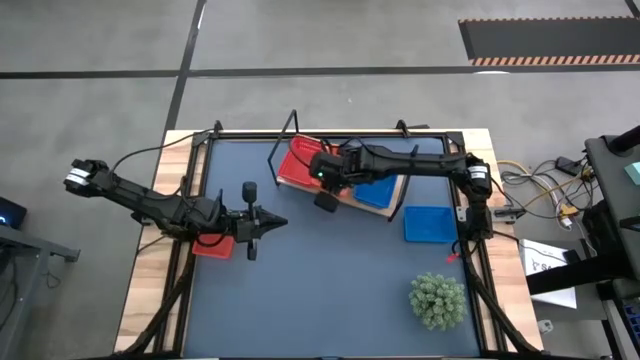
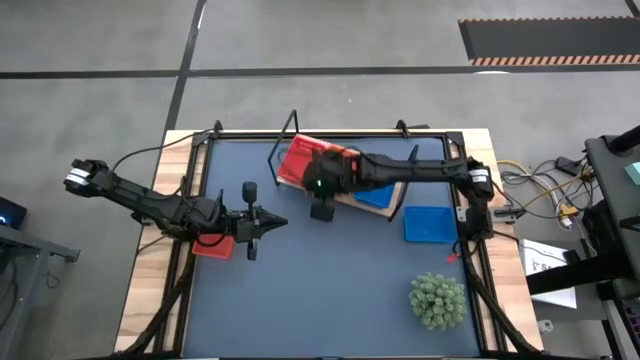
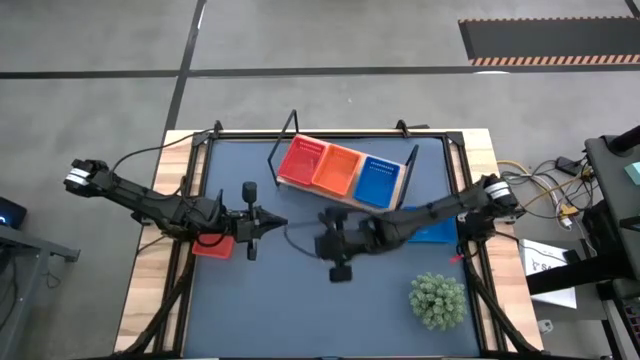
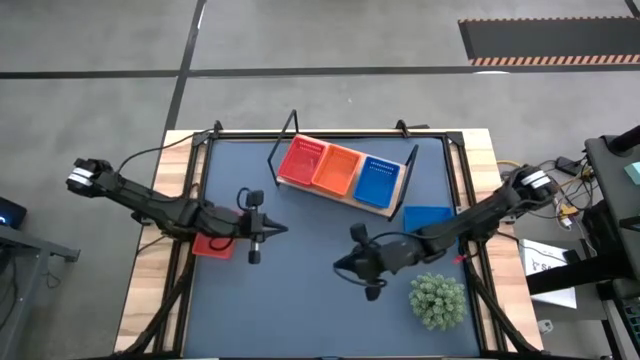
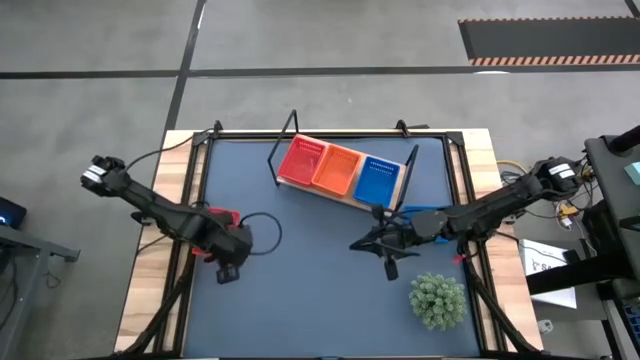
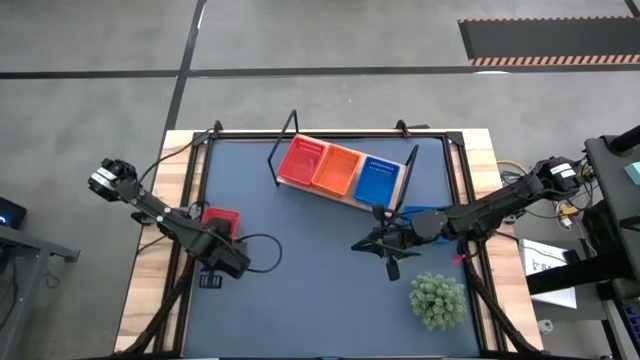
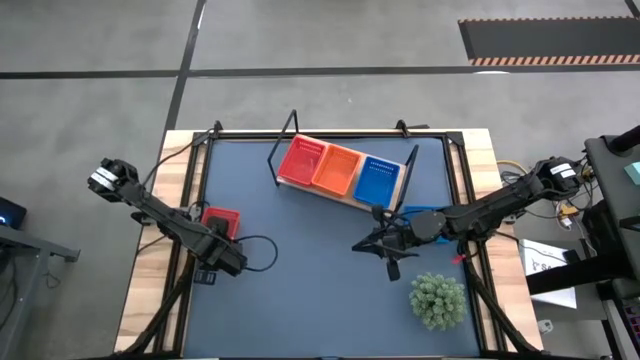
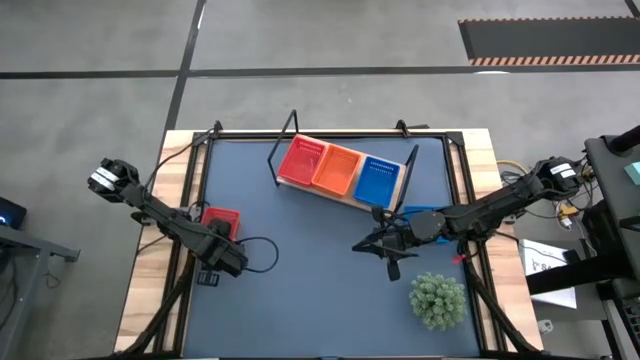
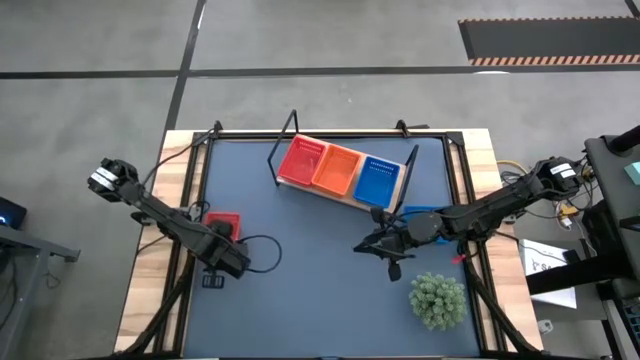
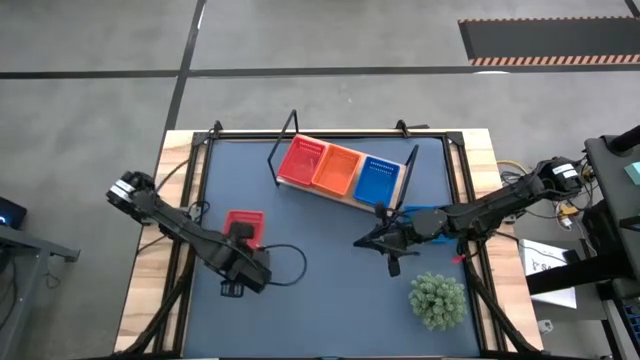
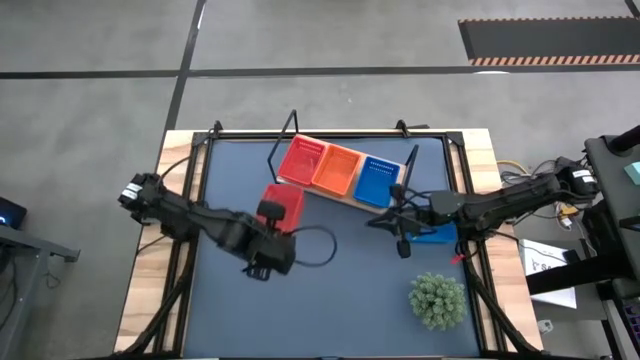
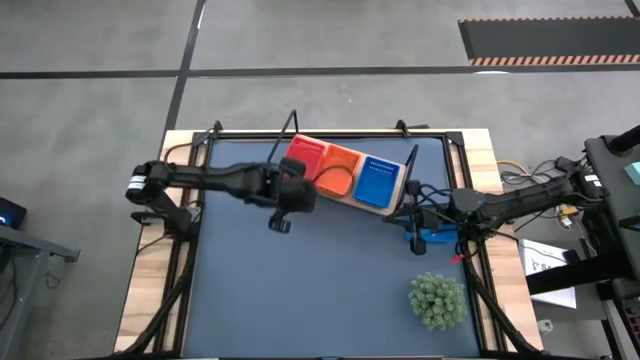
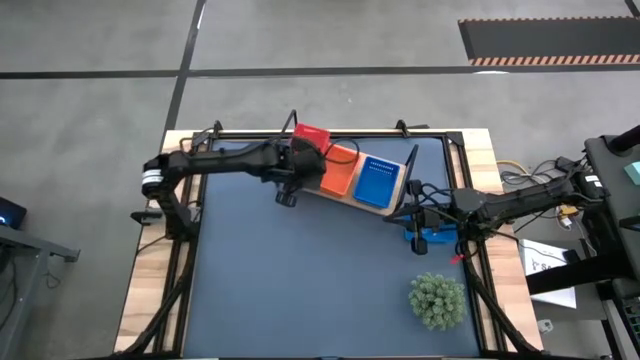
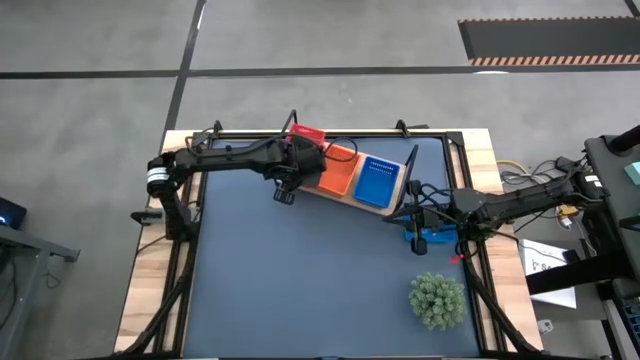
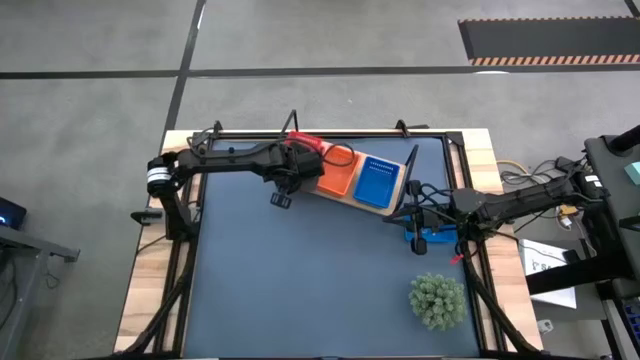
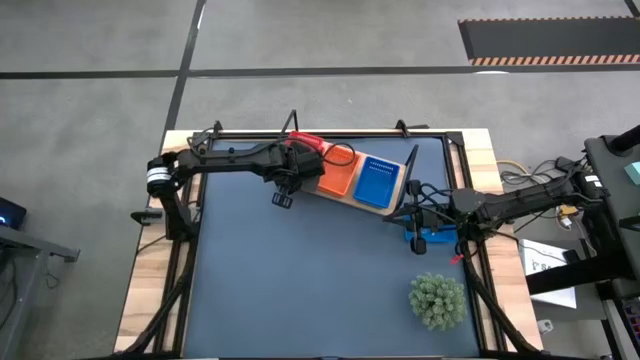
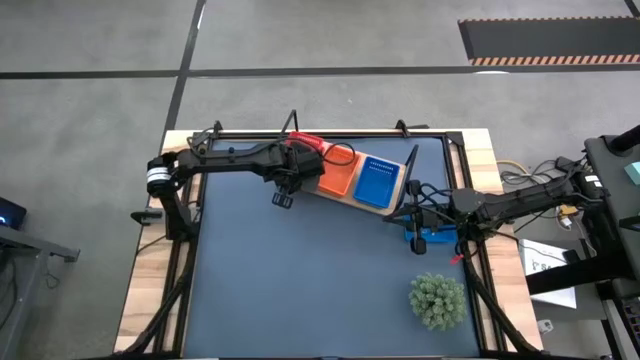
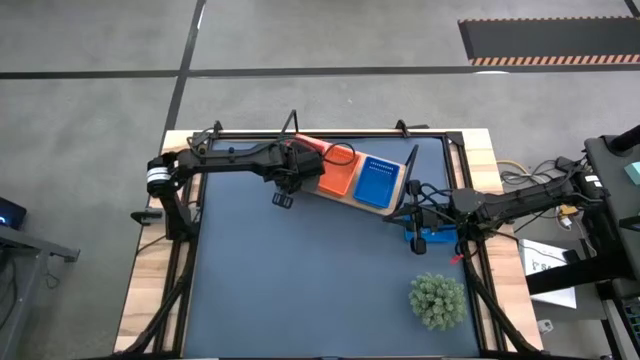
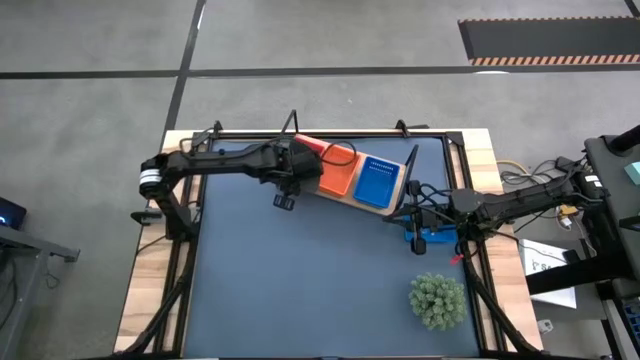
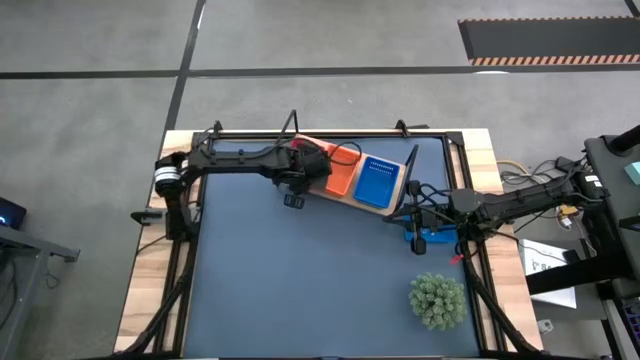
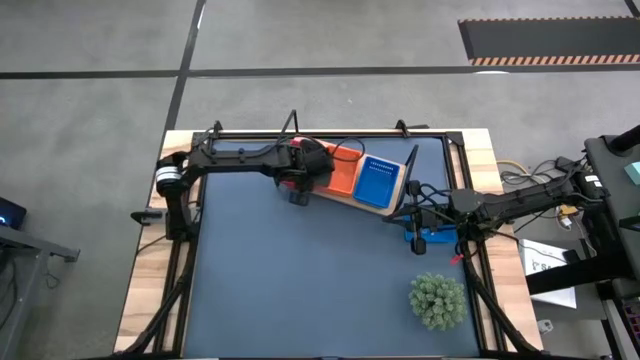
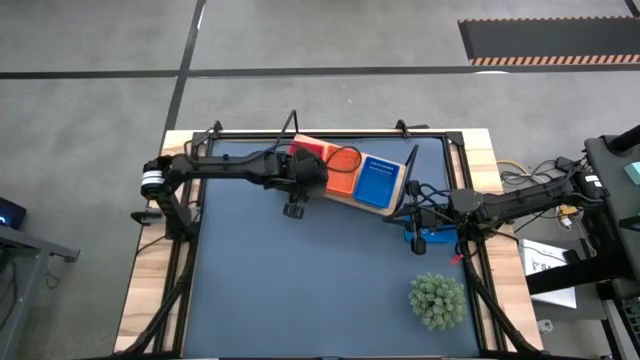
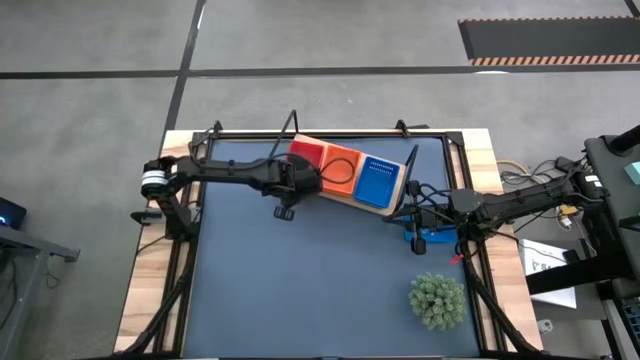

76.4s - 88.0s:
Task: Stack baskets on shelf by color
Stack the red bin on top of the red bins on the shelf

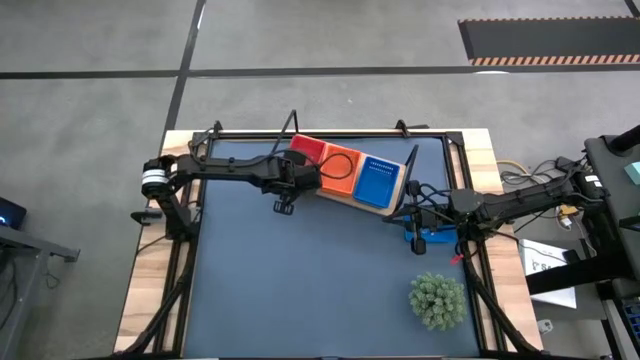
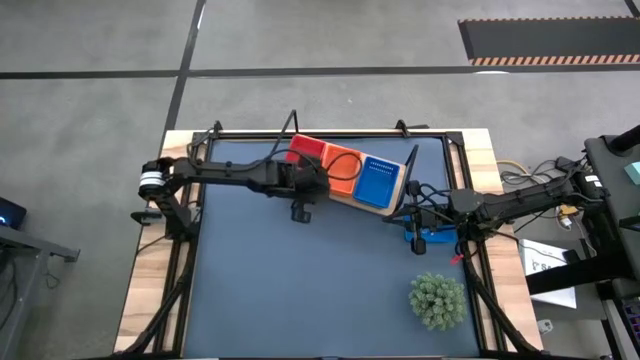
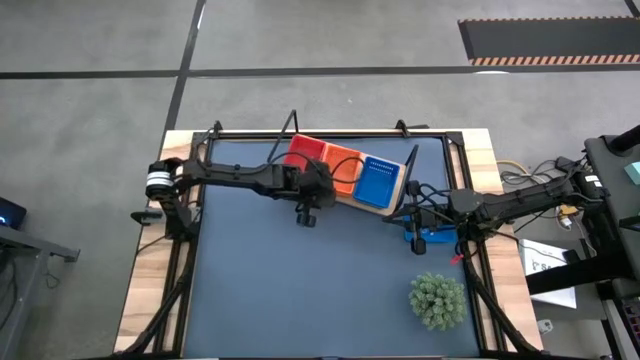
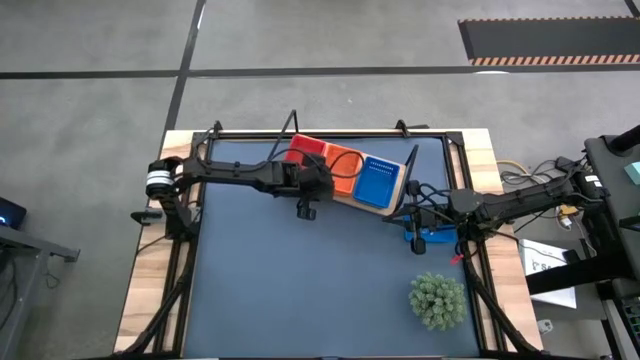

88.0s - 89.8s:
Adjust the stacked orange bins

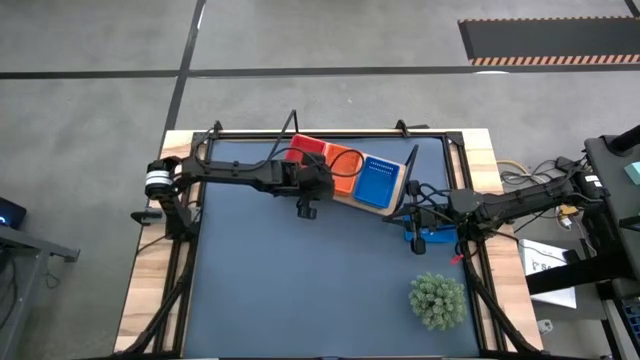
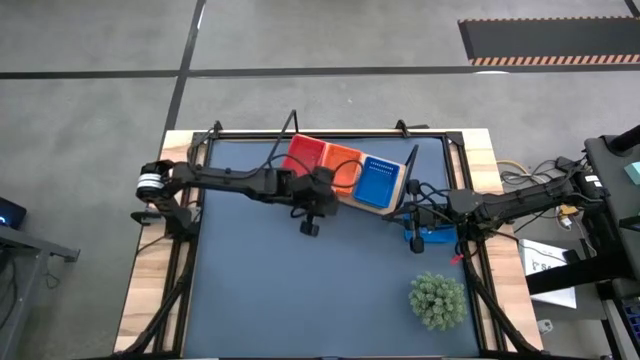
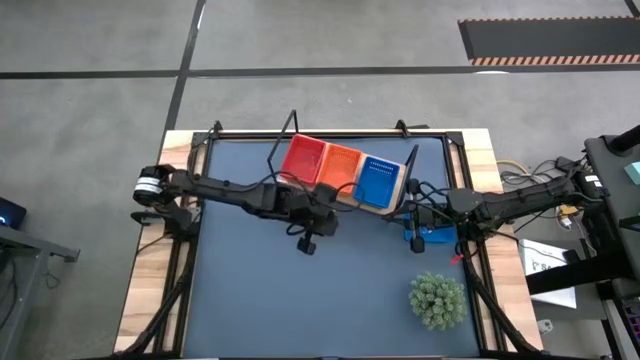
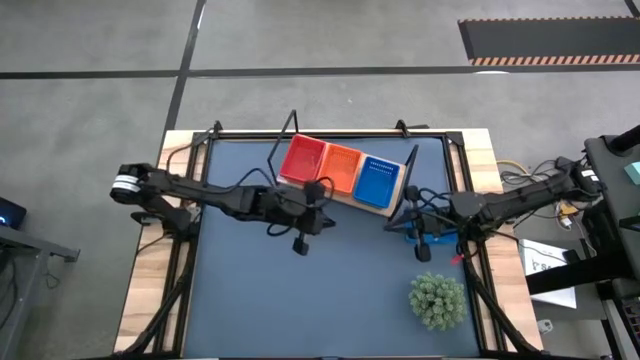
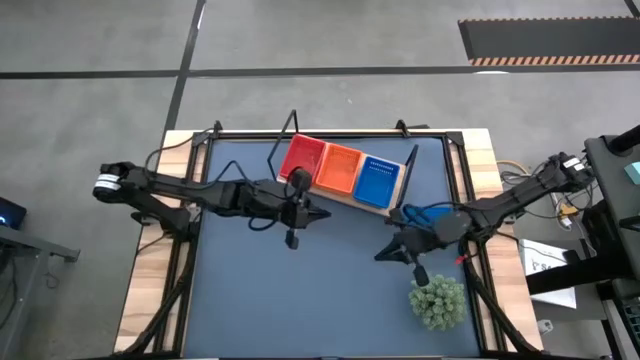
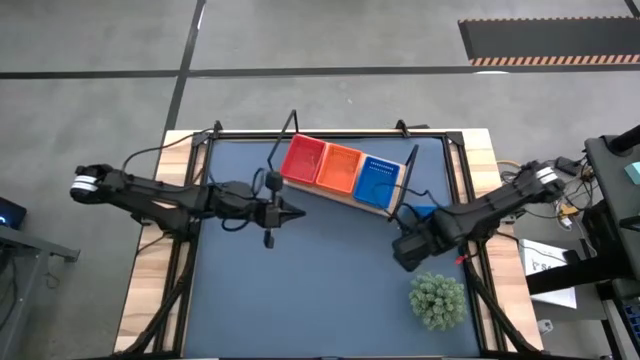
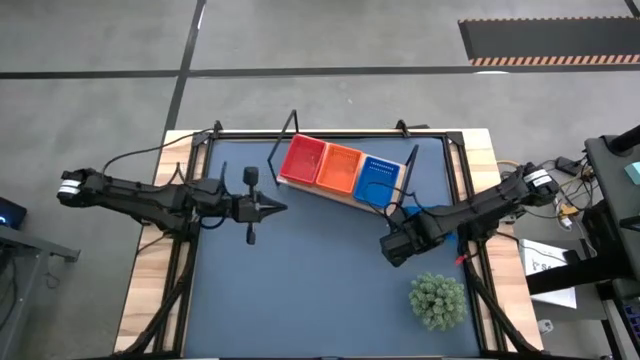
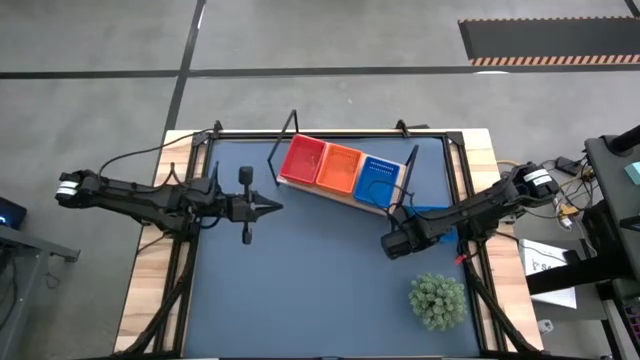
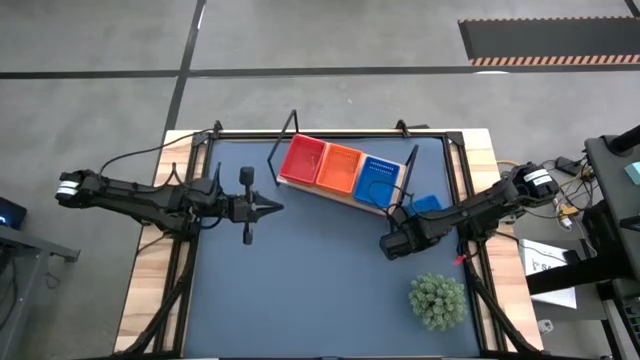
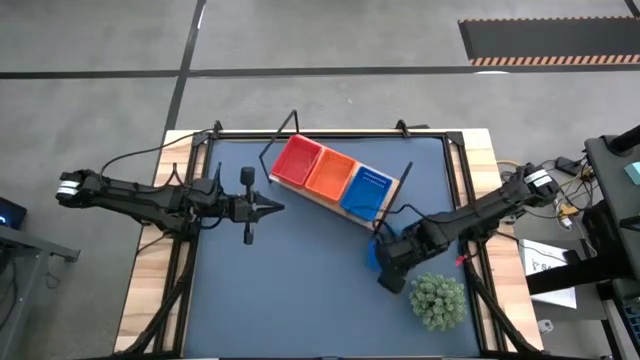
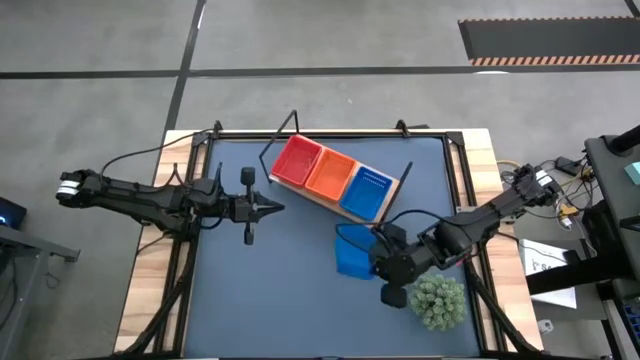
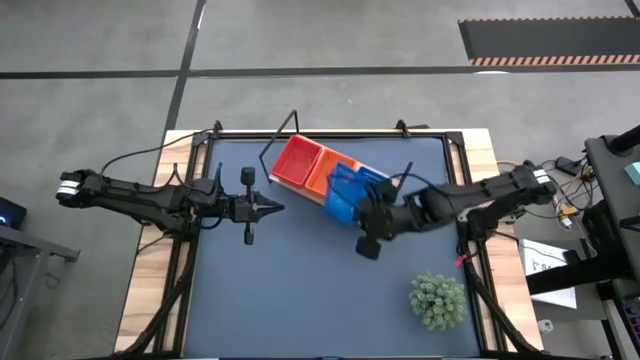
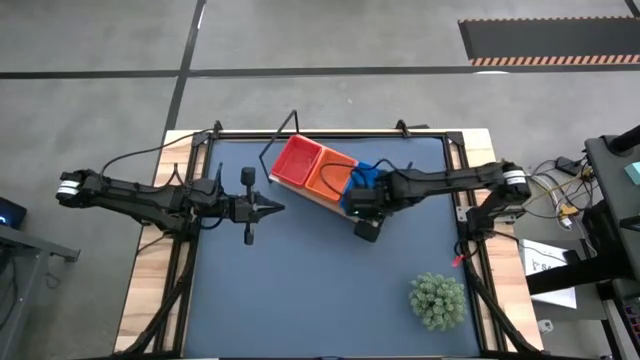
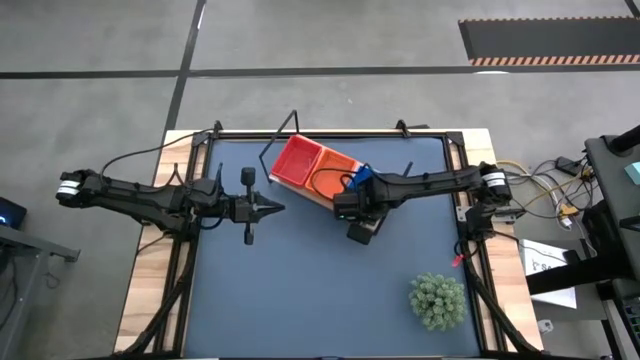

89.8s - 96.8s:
Stack the blue bin on top of the blue bins on the shelf

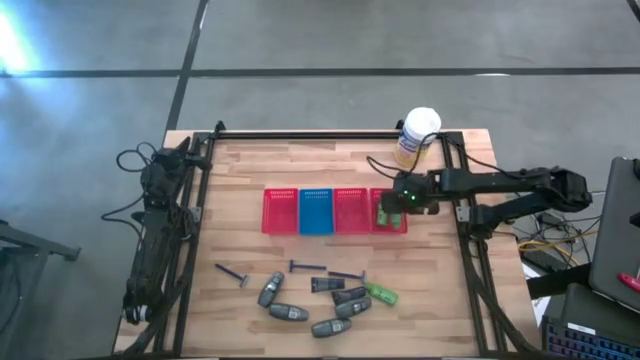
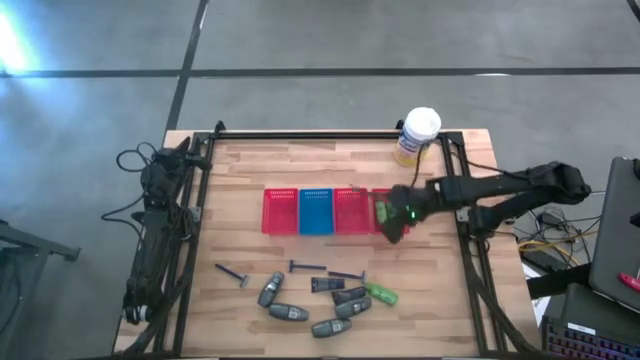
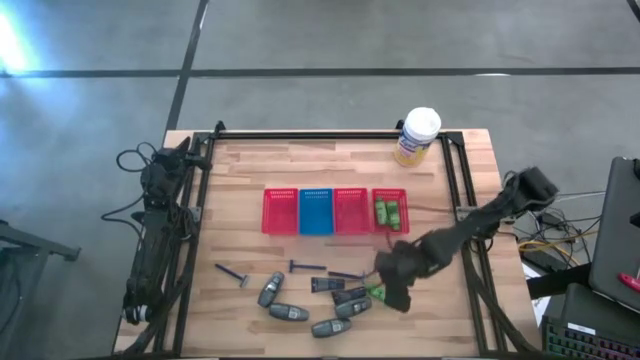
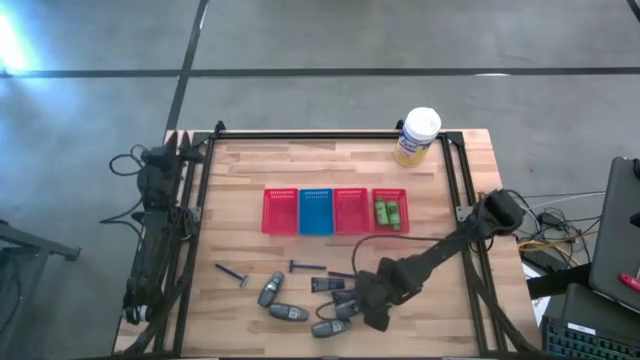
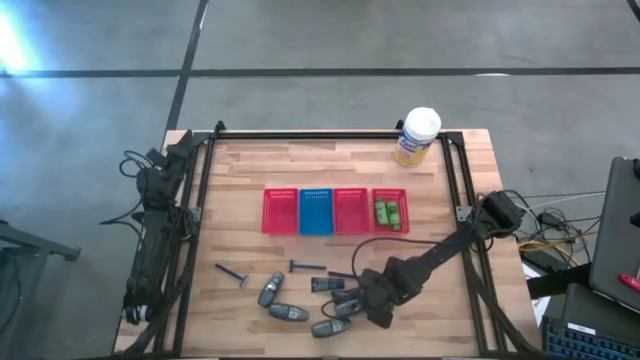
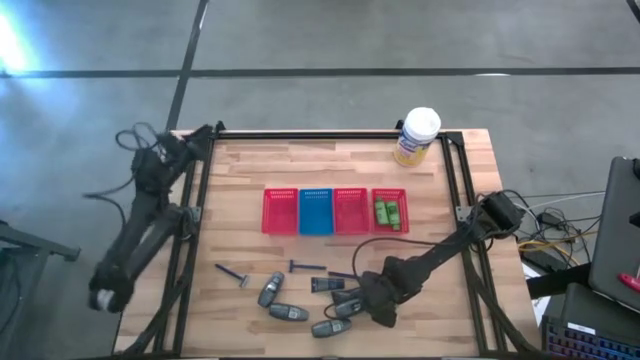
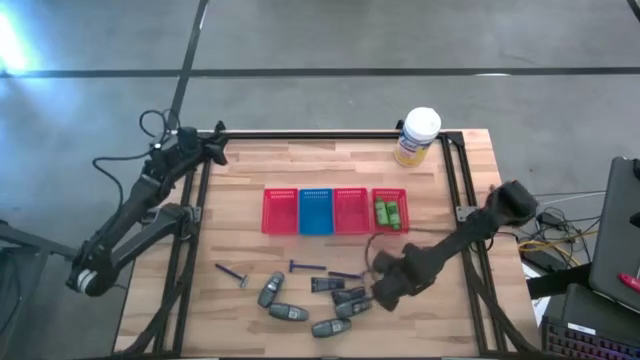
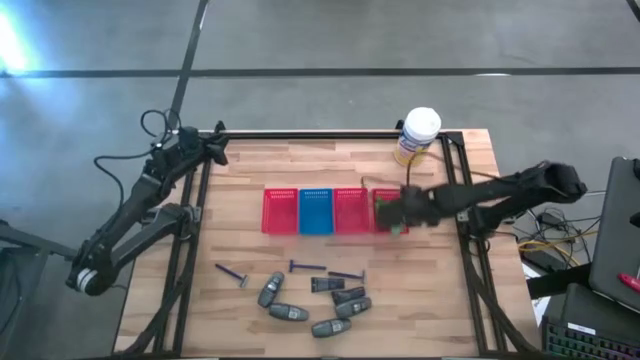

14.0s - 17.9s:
Task: Pick & Place Travel size toiletries
Put the green shampoo into the right red bin
